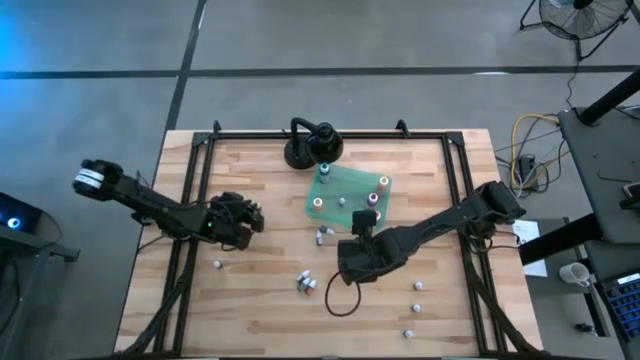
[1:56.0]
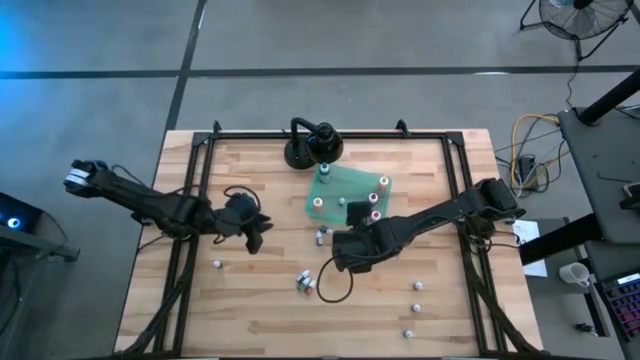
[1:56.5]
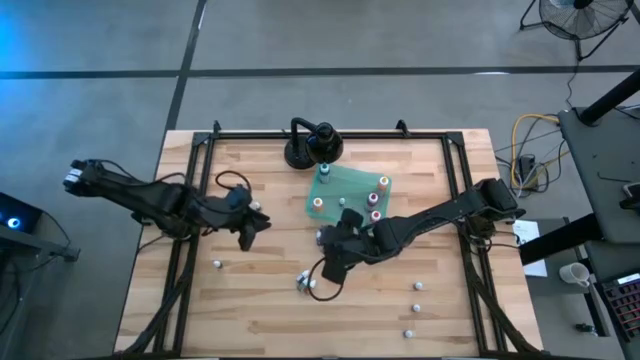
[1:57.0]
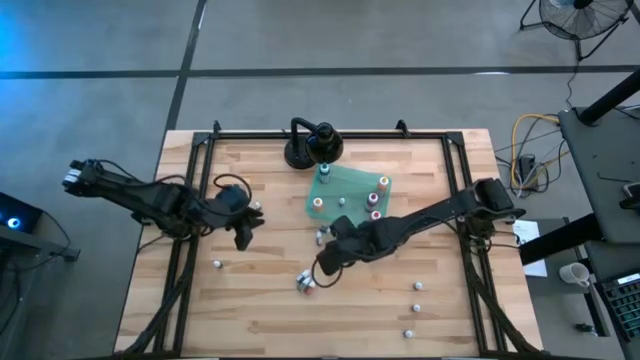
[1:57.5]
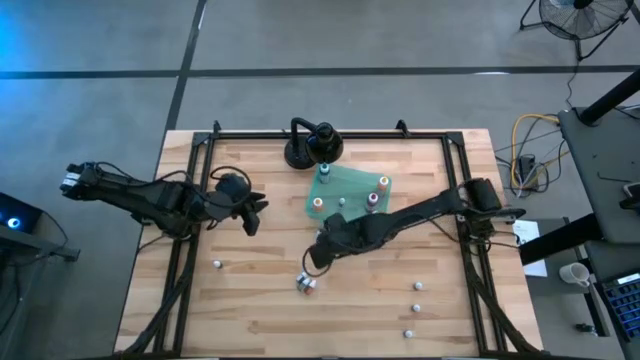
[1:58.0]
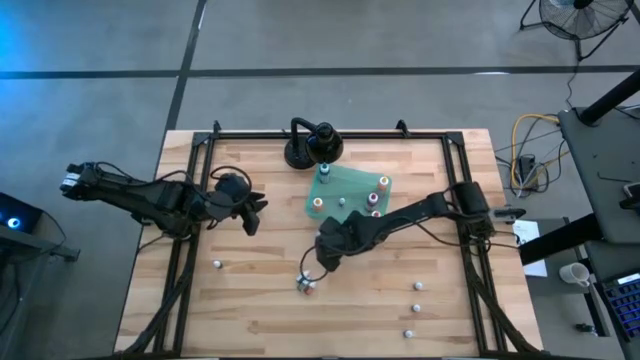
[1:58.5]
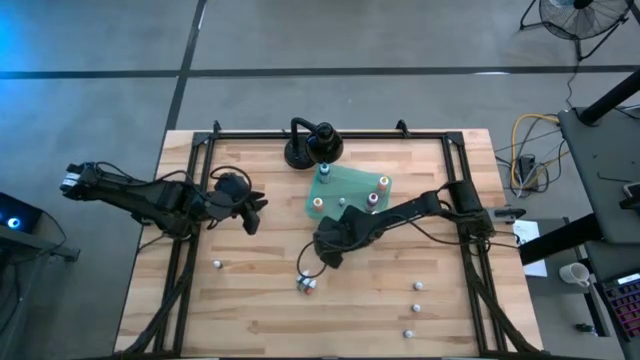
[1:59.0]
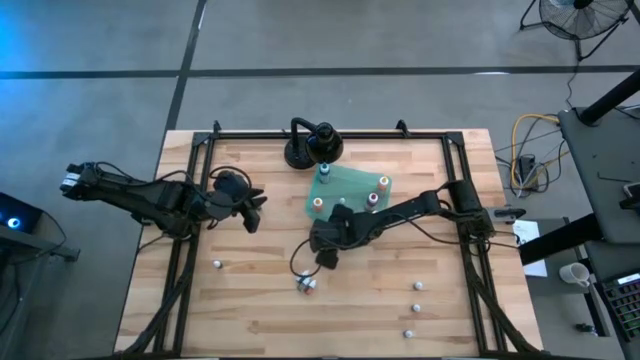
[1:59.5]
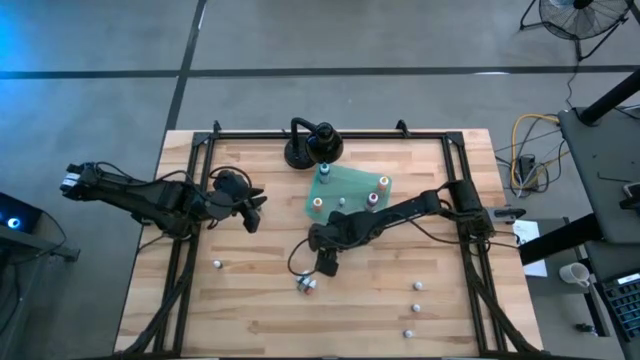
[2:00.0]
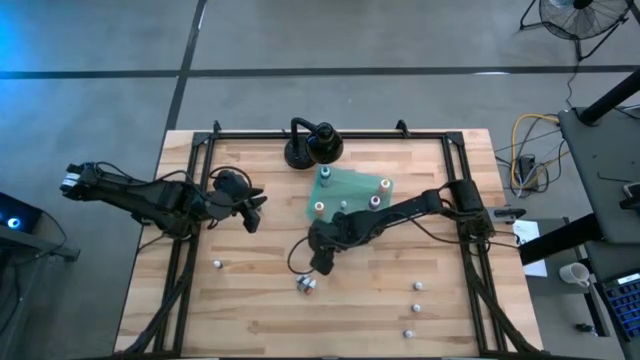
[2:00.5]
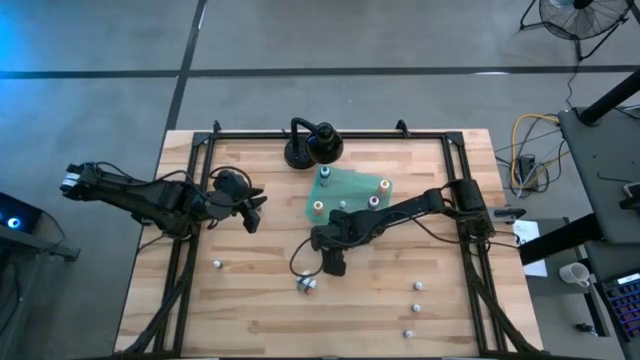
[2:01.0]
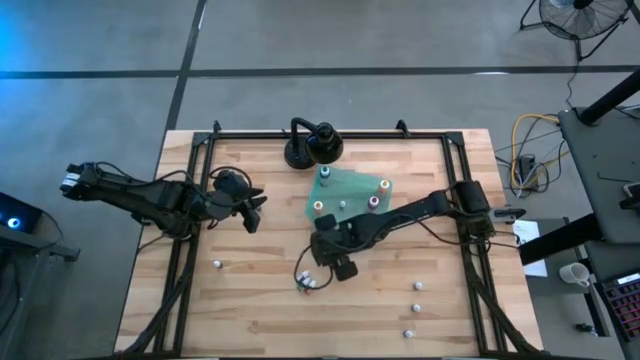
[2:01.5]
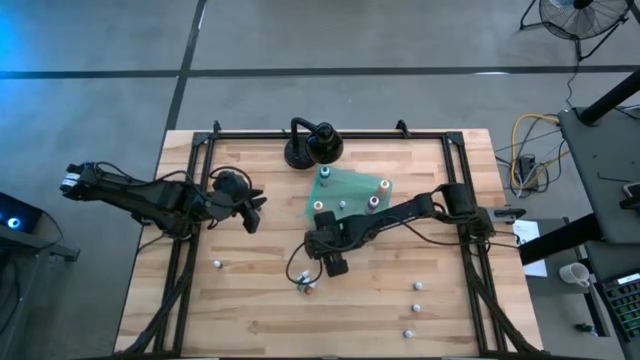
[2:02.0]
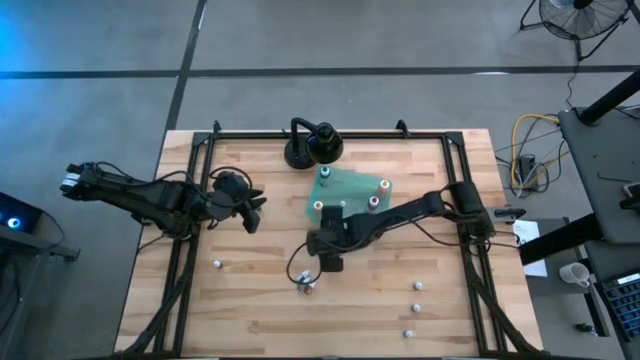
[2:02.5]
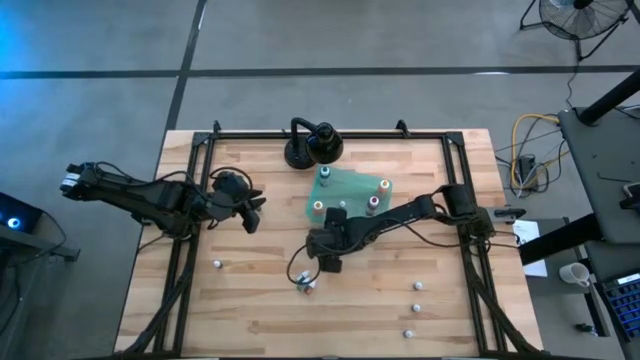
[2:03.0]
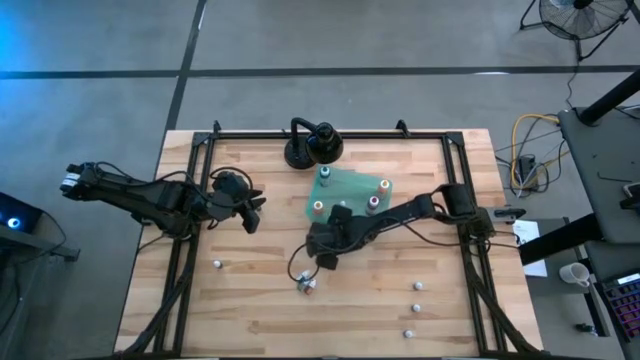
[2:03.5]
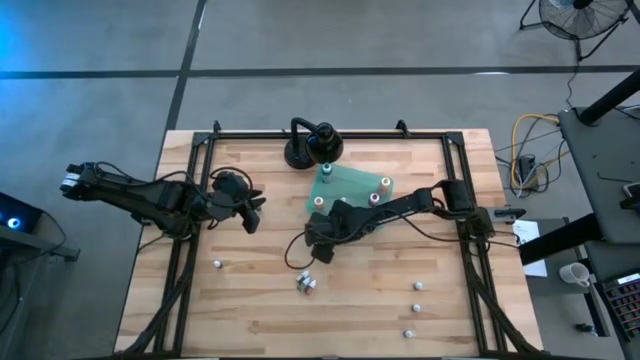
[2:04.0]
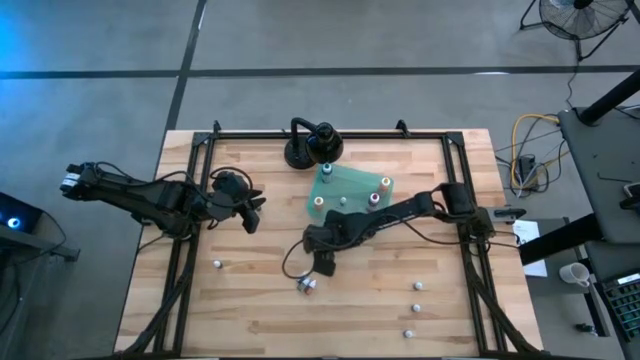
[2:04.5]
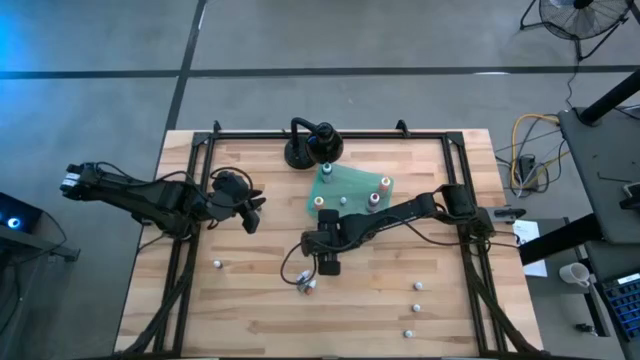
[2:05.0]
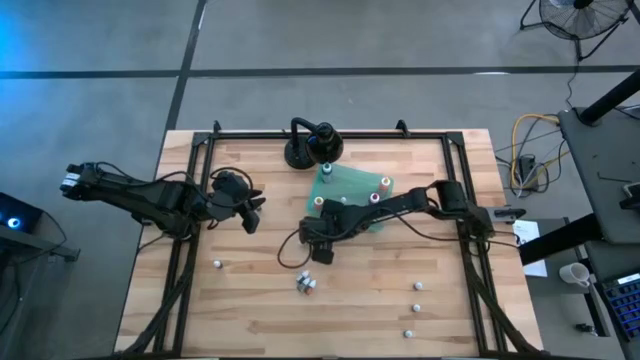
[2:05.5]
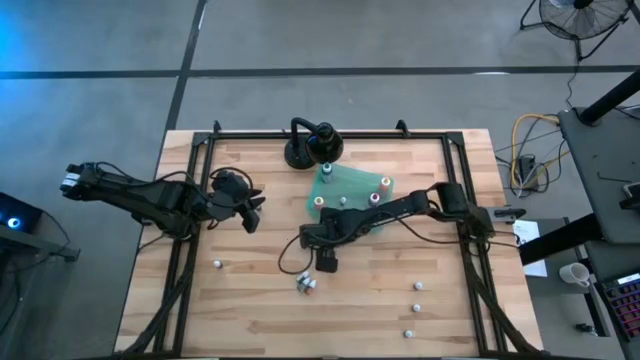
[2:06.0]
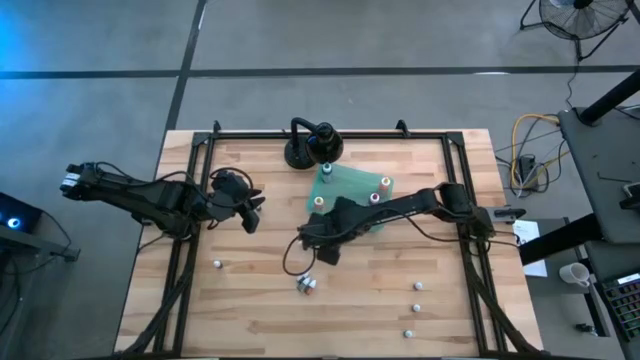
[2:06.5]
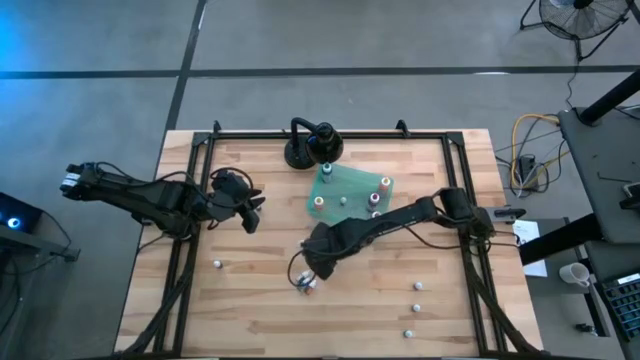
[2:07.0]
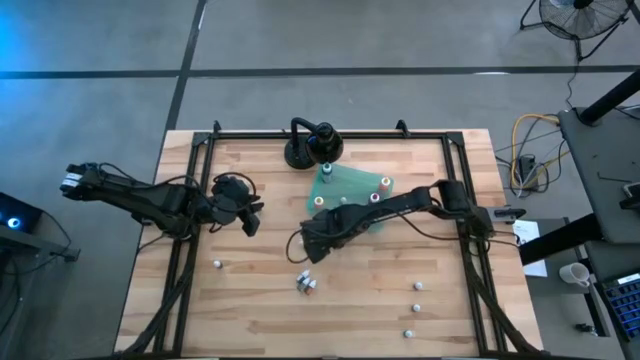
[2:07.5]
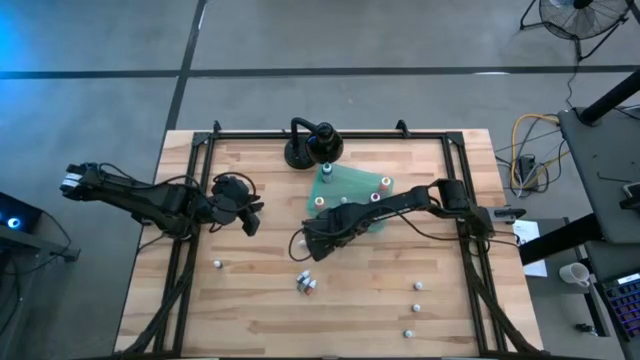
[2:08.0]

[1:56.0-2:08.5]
Task: Pick & Place food coloring
Move the blue food coloring bottle to the bottom right of the table

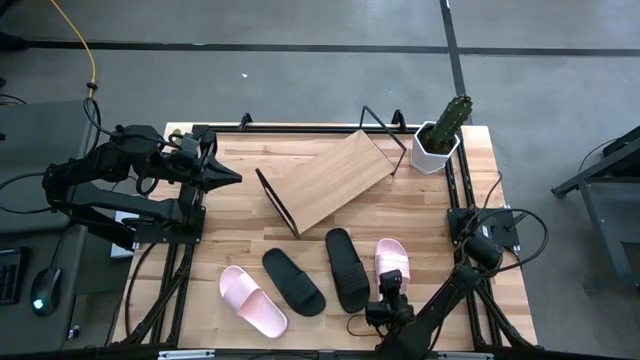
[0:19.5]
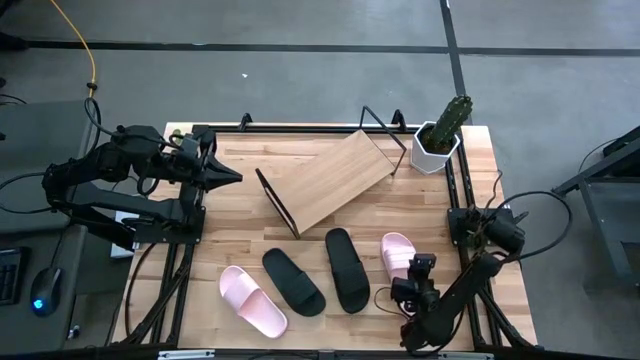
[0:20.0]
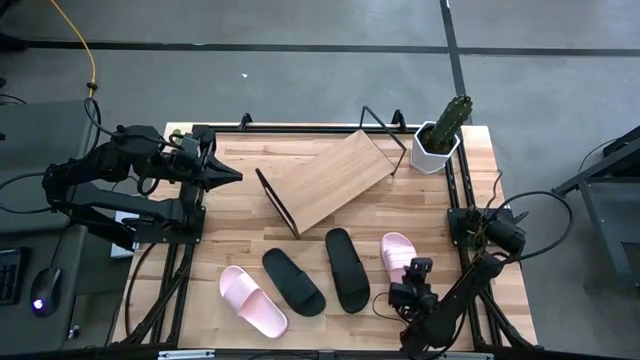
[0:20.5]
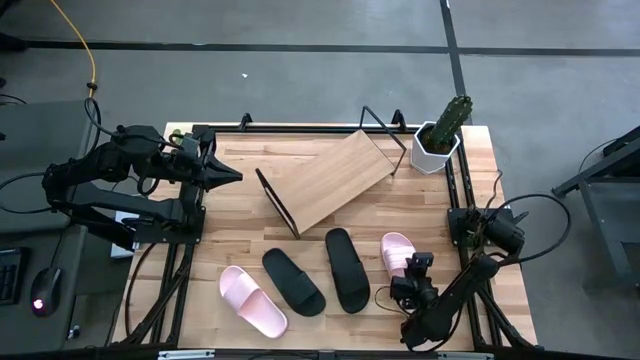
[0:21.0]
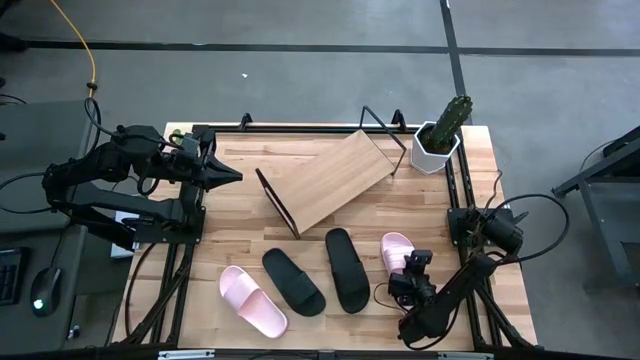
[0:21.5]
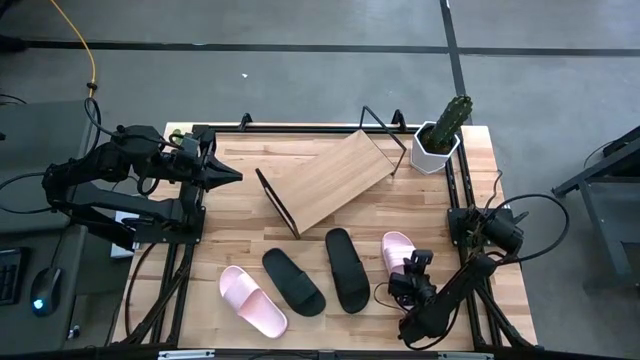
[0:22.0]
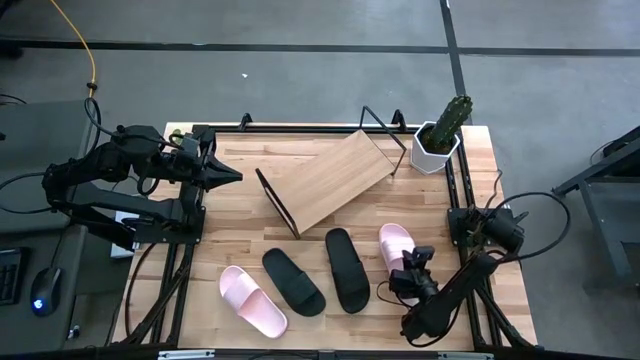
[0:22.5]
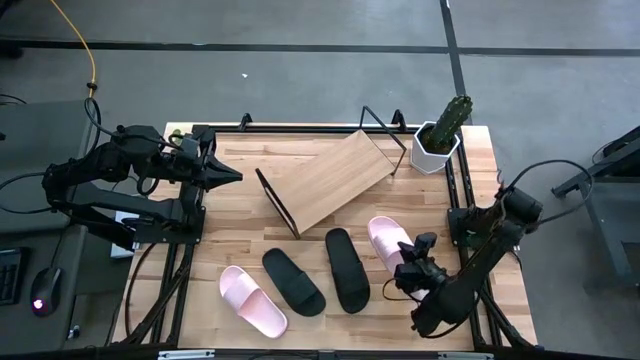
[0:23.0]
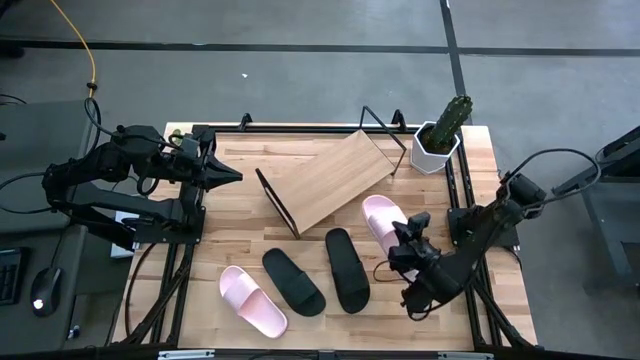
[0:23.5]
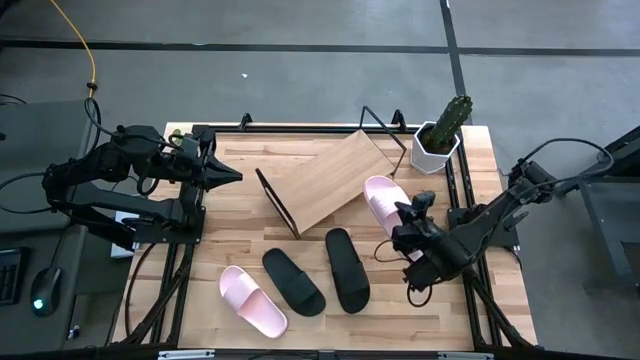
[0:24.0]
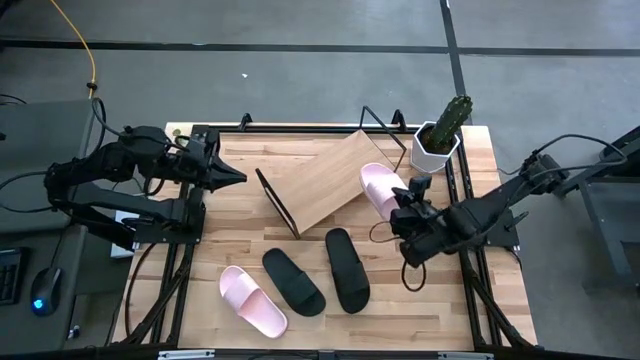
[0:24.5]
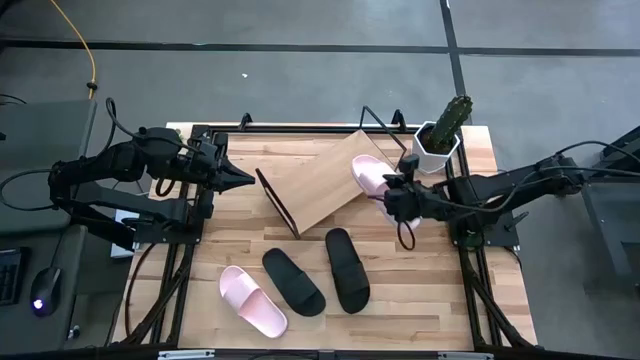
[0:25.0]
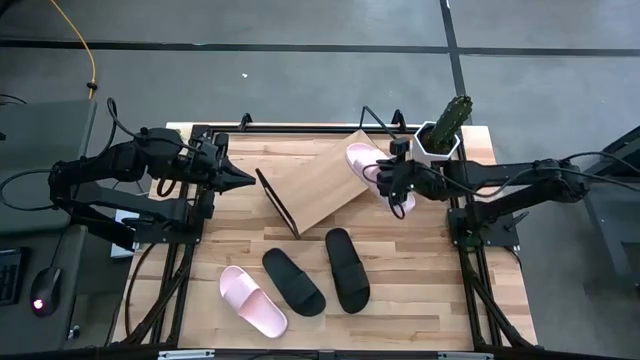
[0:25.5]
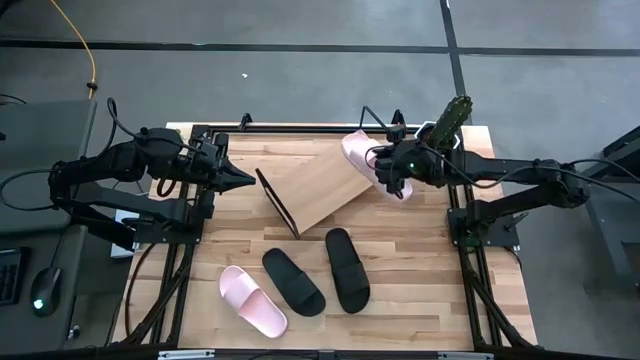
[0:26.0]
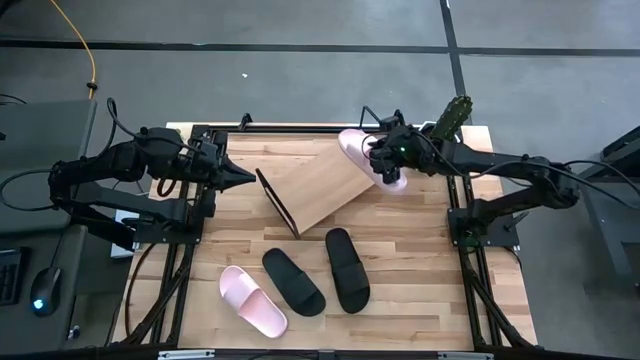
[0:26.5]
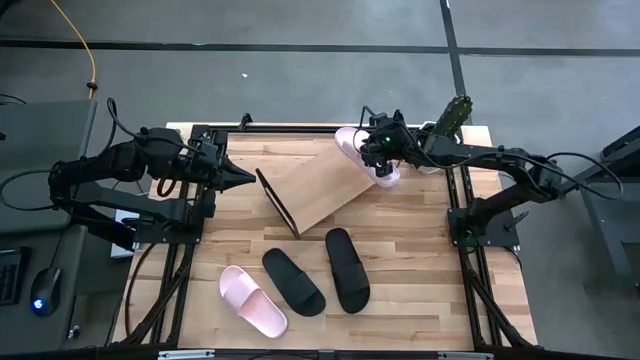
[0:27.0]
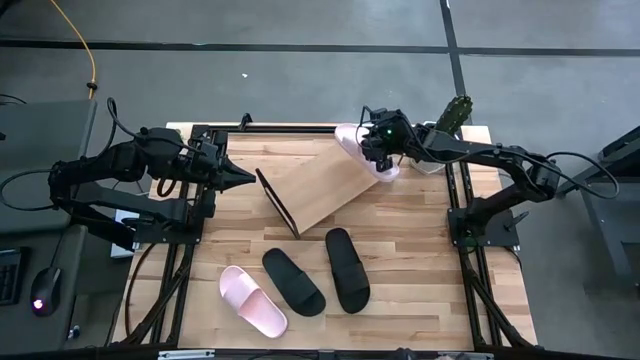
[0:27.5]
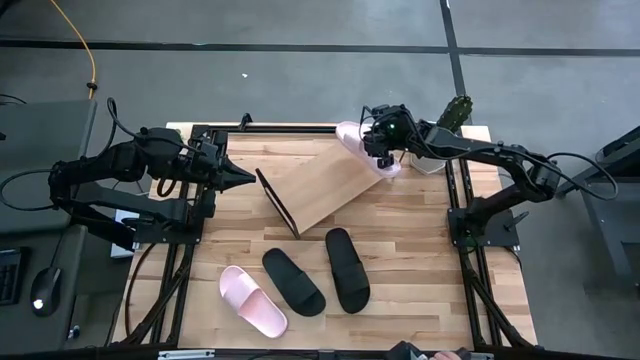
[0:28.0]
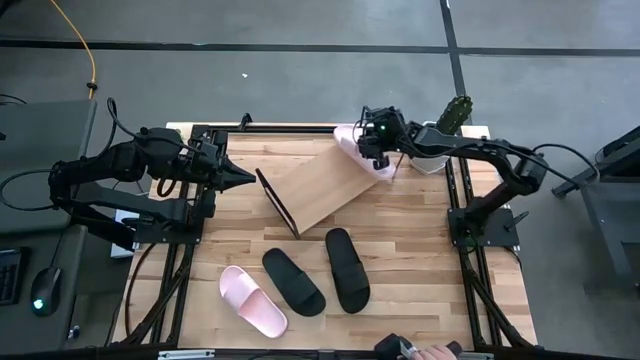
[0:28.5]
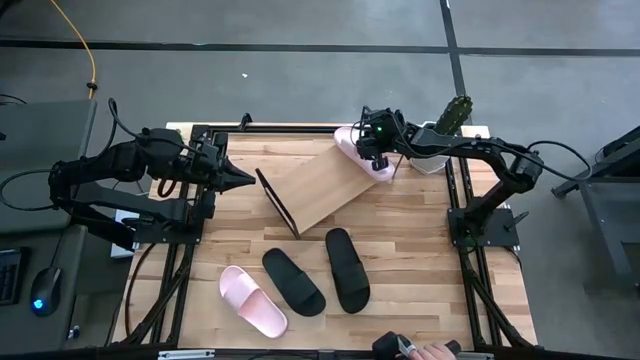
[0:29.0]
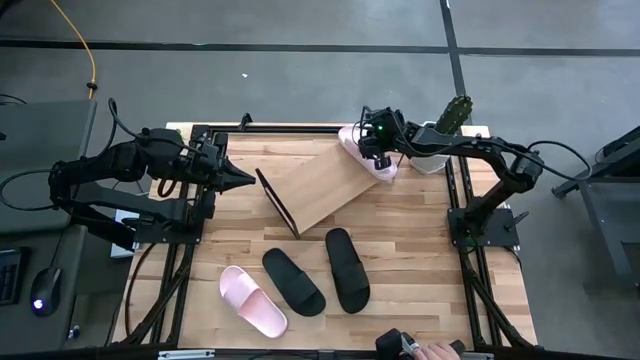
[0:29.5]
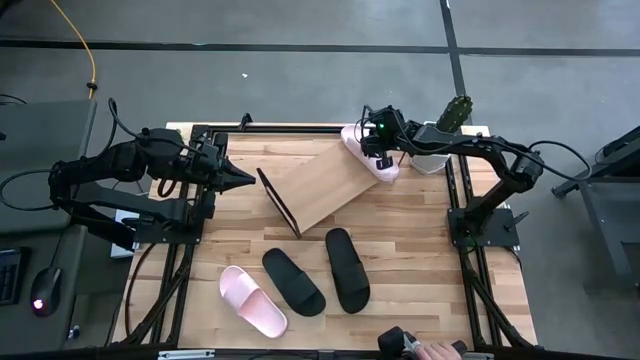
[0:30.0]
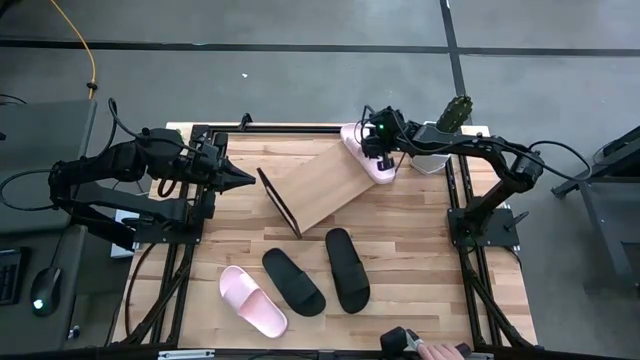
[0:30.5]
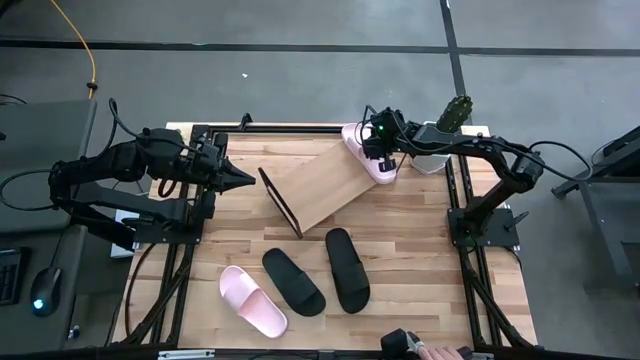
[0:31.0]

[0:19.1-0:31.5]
Task: Pick and place slides into the shelf
Put the right pink slide on the shelf
